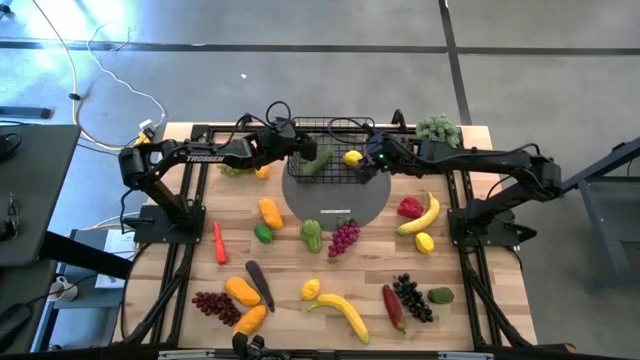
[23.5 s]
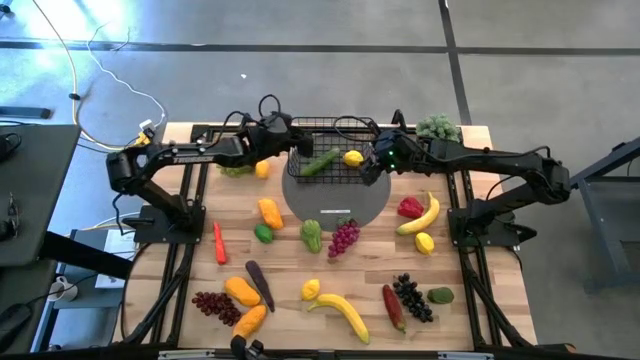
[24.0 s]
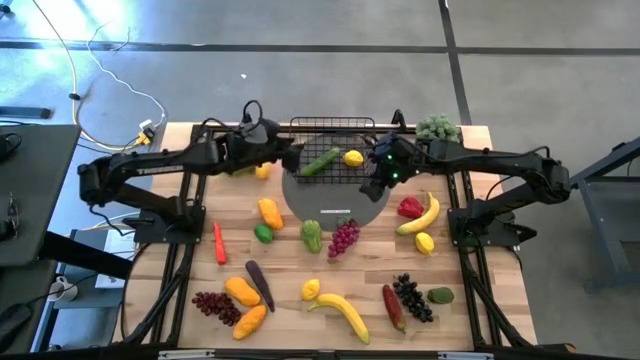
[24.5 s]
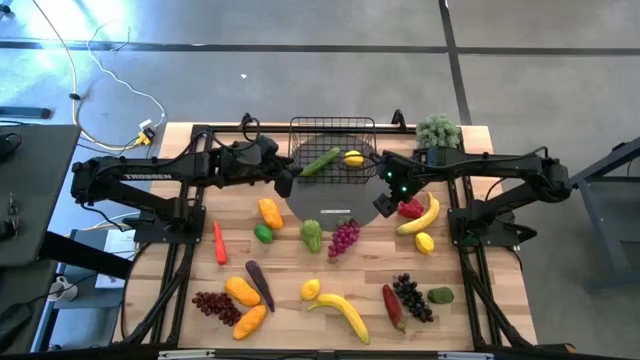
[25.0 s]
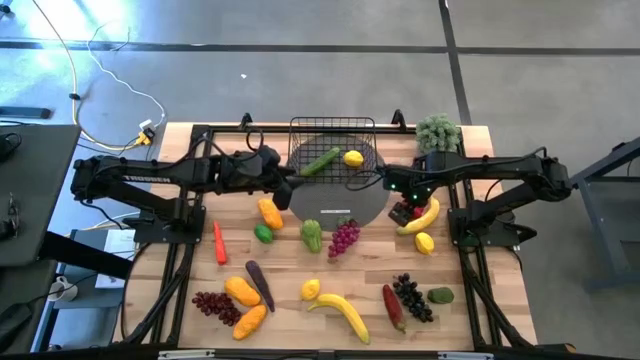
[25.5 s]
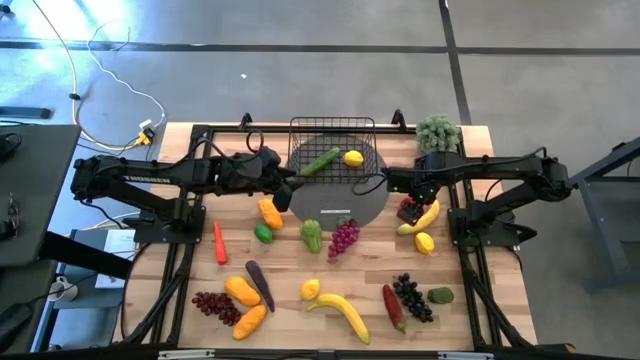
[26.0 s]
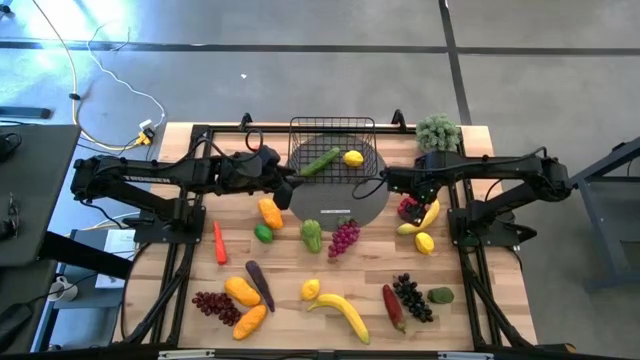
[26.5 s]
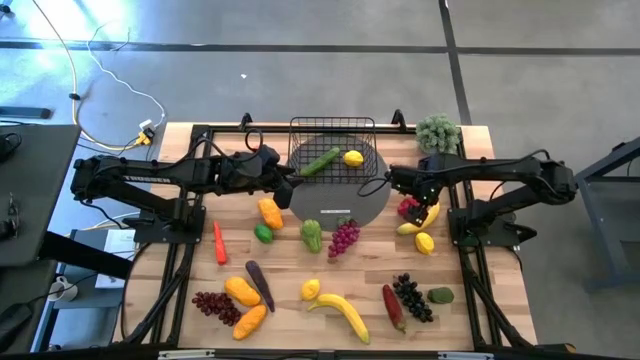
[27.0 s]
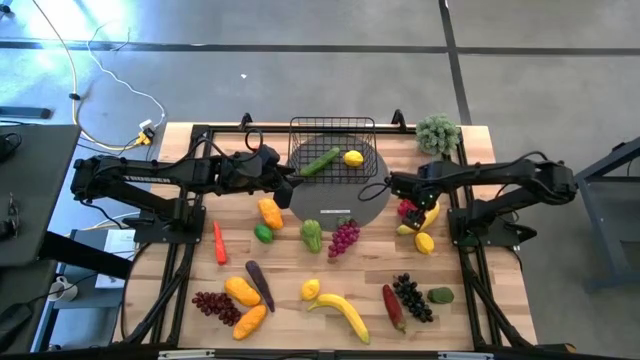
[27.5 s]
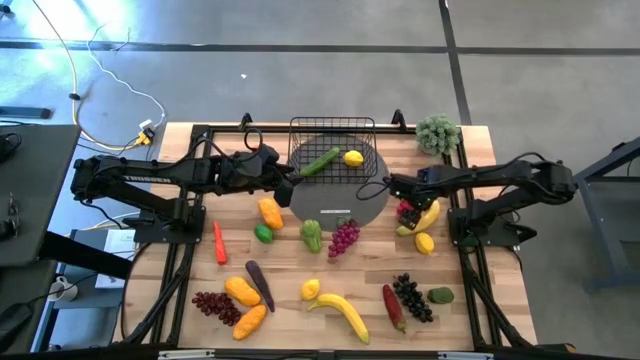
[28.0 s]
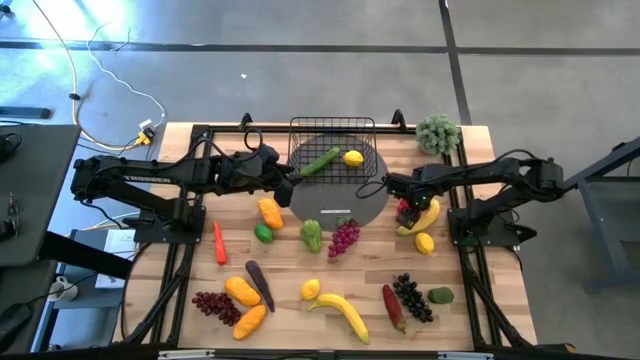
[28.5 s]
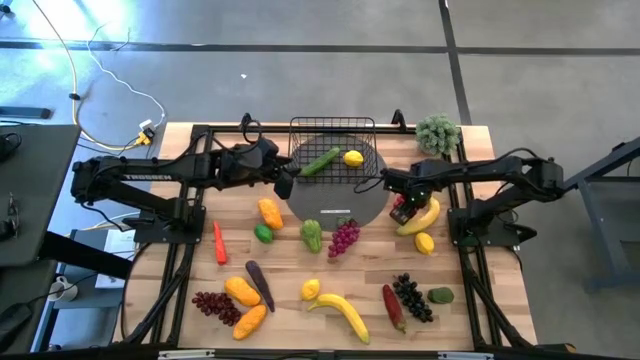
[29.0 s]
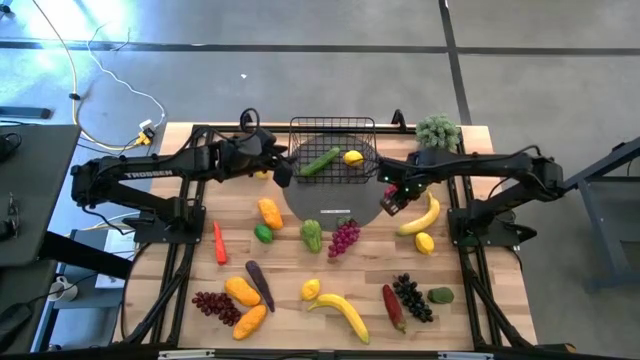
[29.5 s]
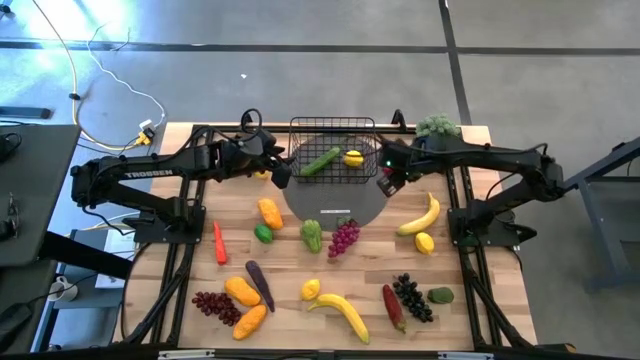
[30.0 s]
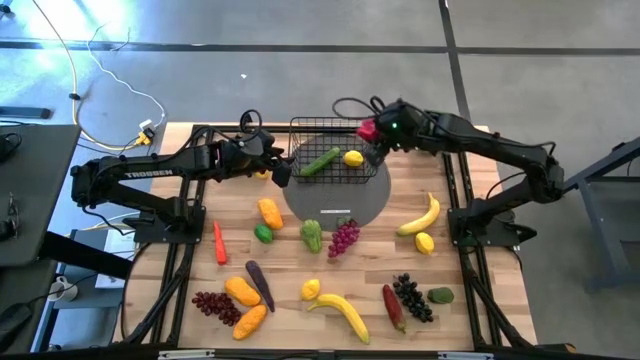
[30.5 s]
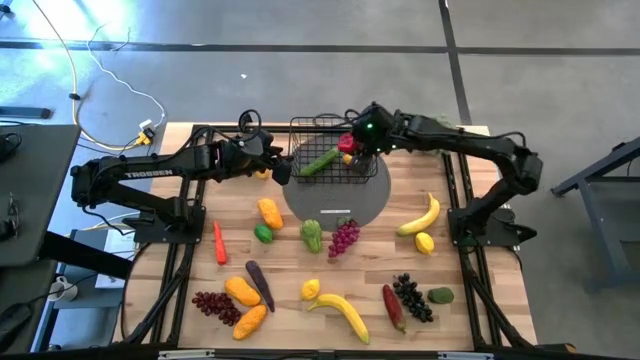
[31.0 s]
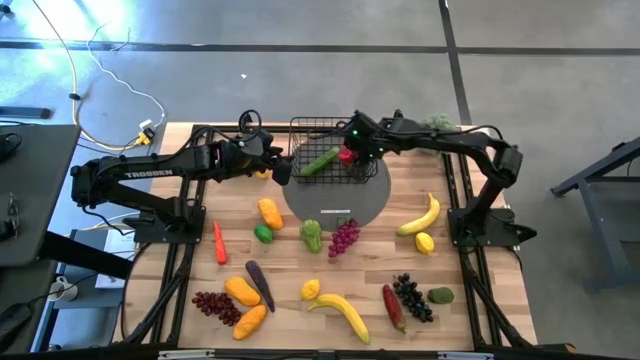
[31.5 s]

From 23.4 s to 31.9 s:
Task: Build produce basket
Put the red bell pepper into the wire basket

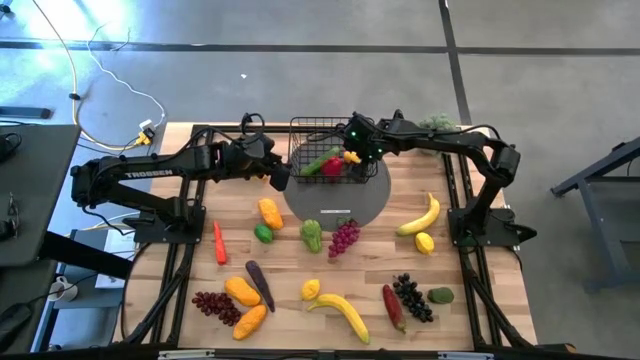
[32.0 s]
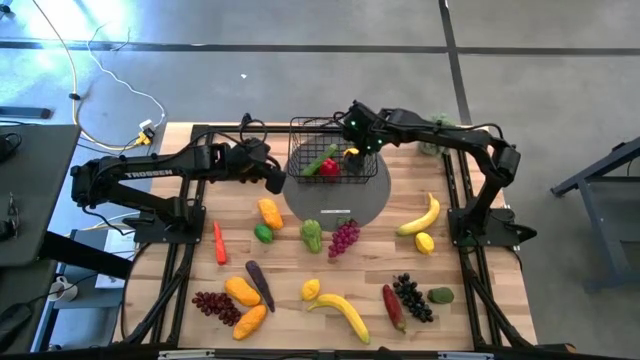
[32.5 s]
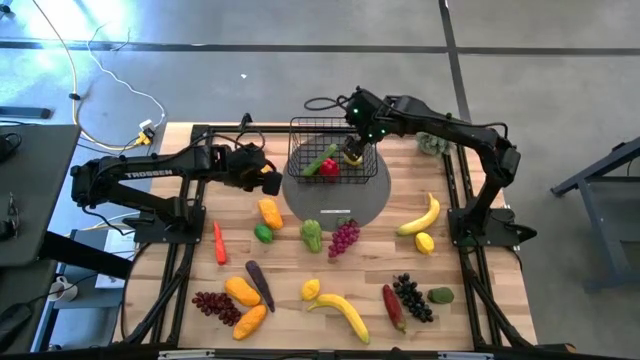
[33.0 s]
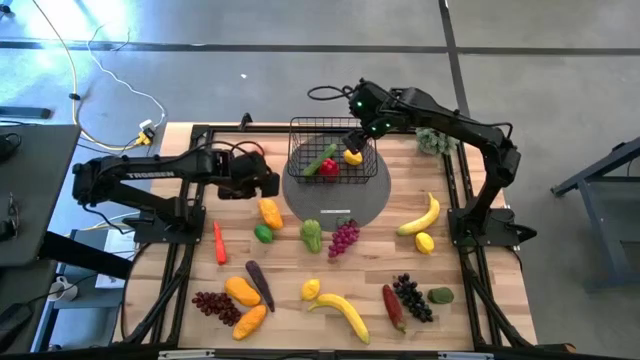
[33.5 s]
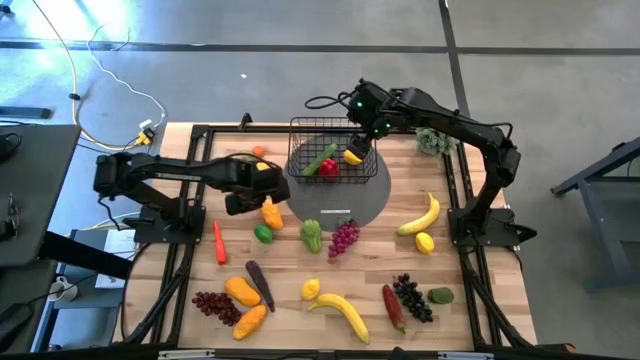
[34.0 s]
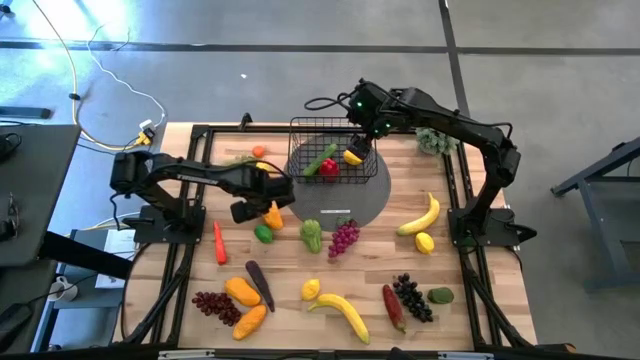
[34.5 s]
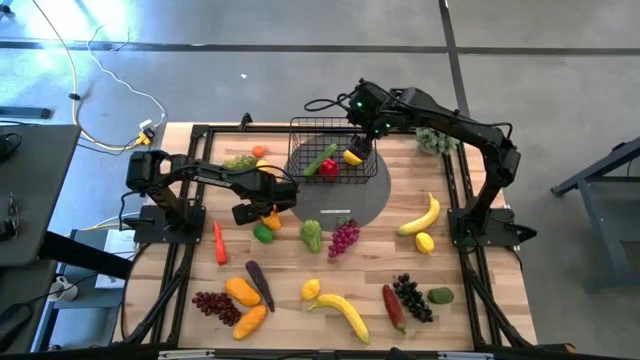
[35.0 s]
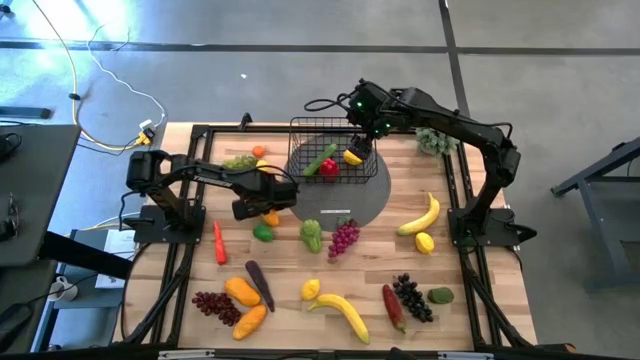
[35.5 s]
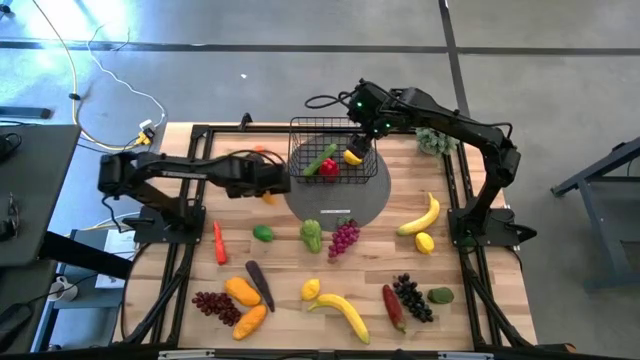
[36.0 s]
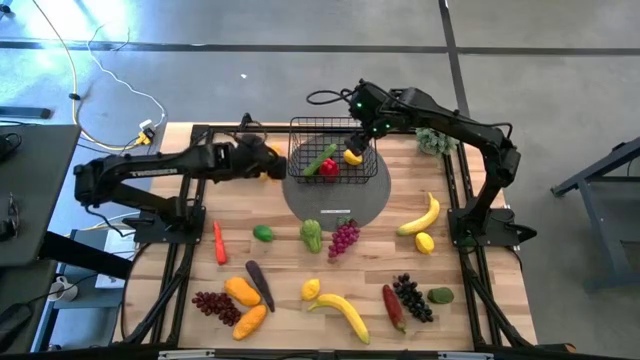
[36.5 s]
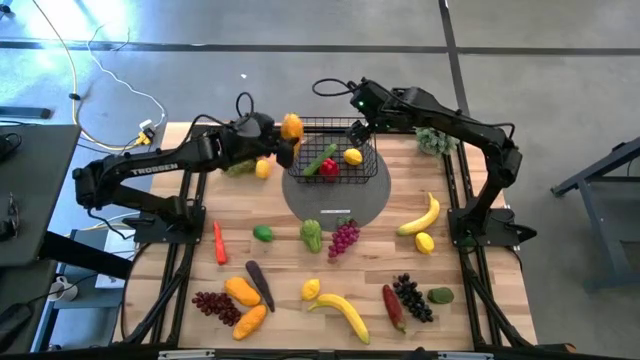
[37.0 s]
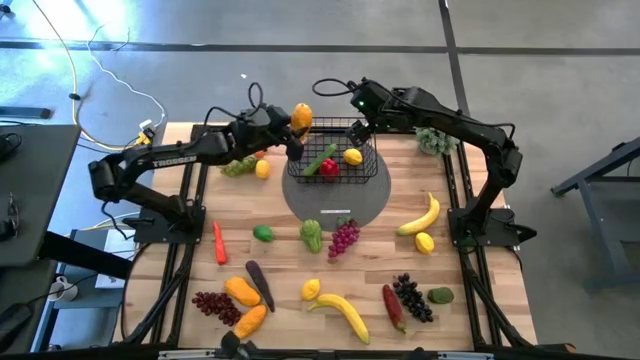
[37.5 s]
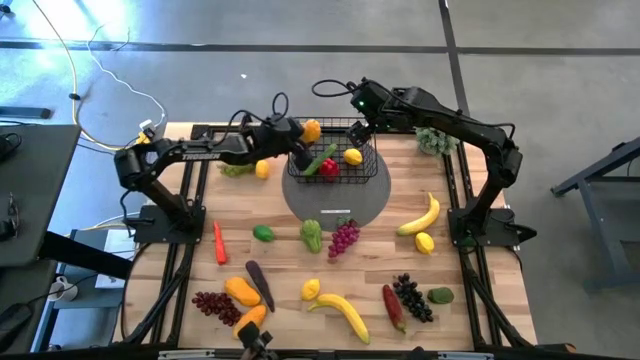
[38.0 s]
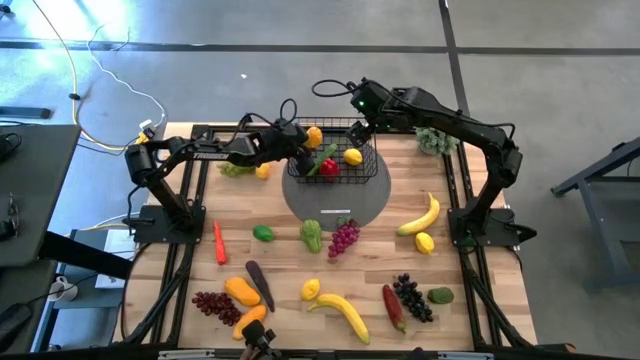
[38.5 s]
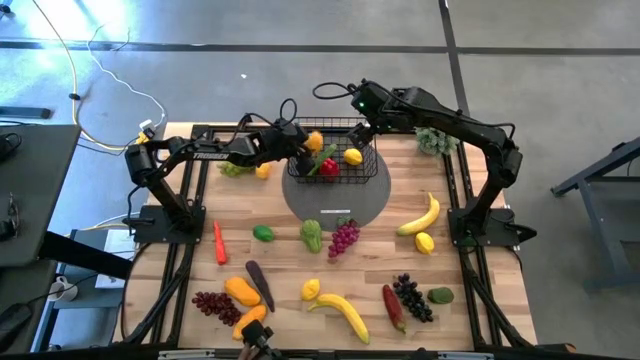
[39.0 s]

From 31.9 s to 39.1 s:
Put the yellow mango into the wire basket

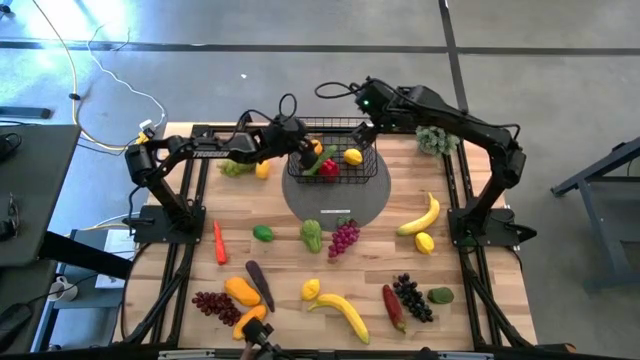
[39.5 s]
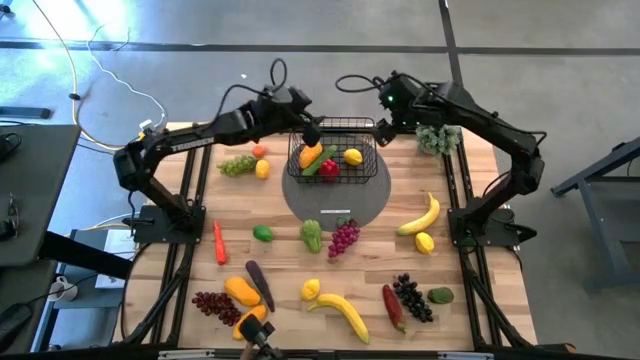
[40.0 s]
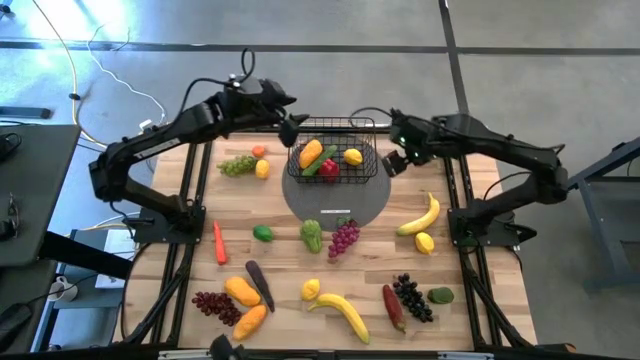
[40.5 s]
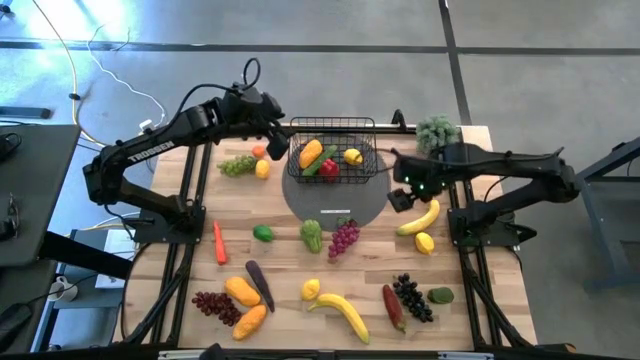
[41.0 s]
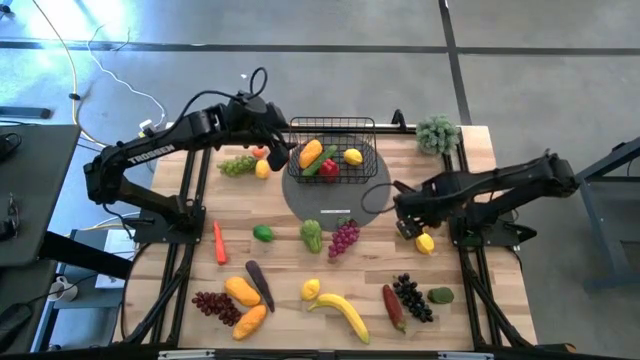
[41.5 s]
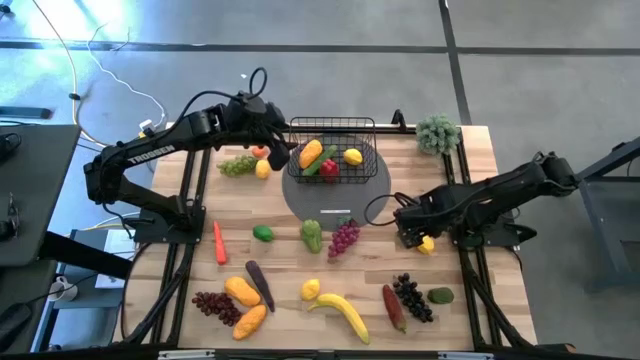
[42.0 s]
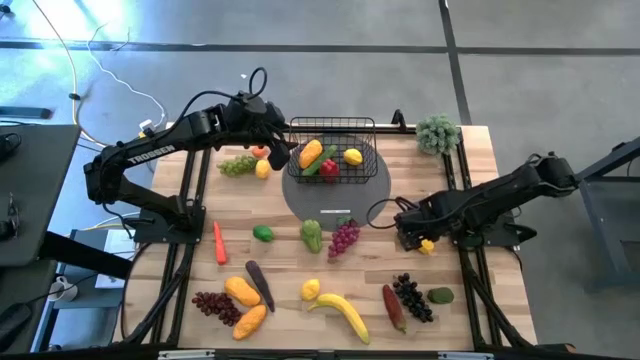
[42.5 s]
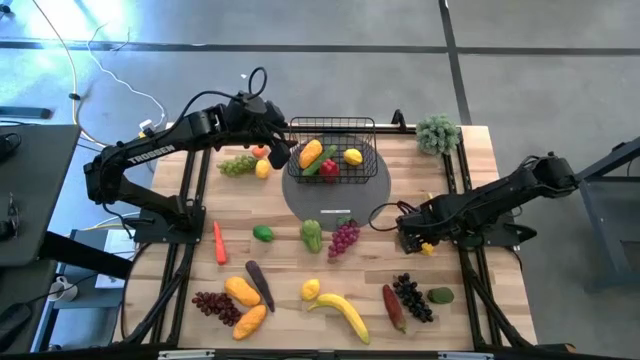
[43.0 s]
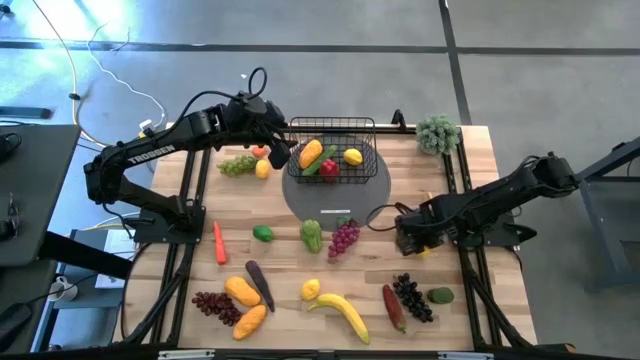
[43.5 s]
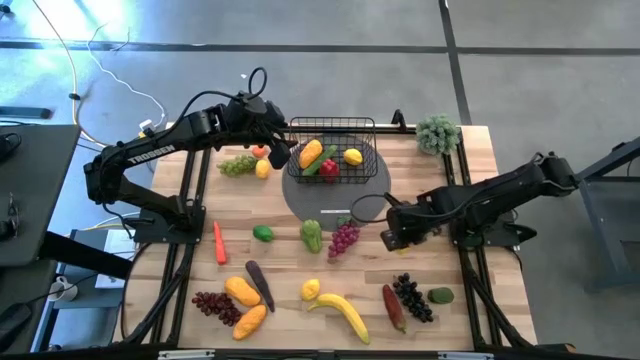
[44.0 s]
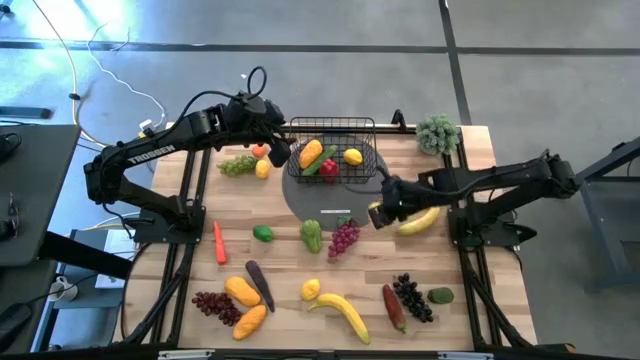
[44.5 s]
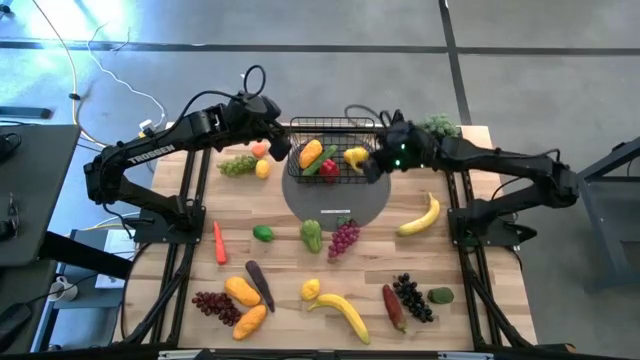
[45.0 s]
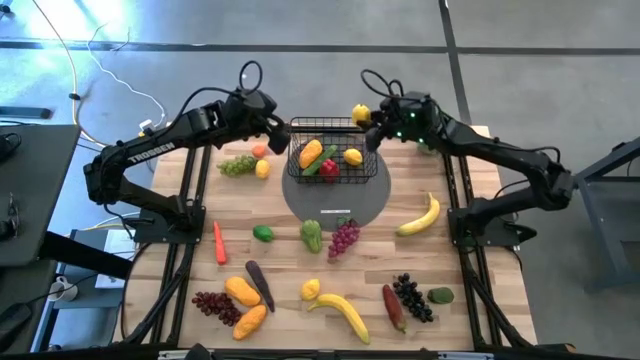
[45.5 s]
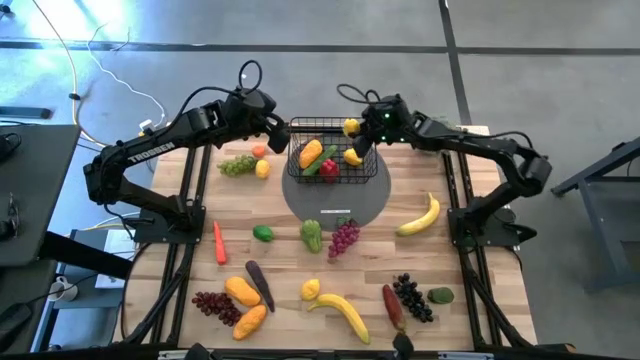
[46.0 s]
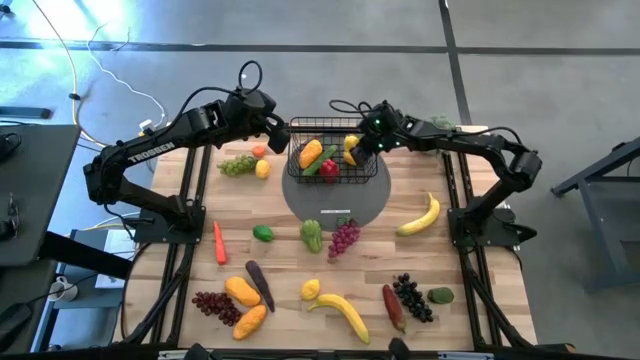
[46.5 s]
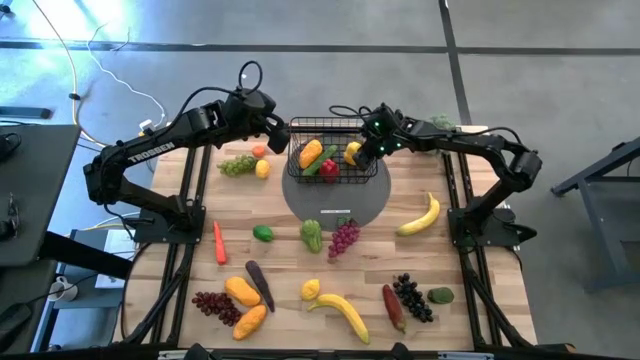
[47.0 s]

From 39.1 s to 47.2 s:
Put the yellow lemon into the wire basket
